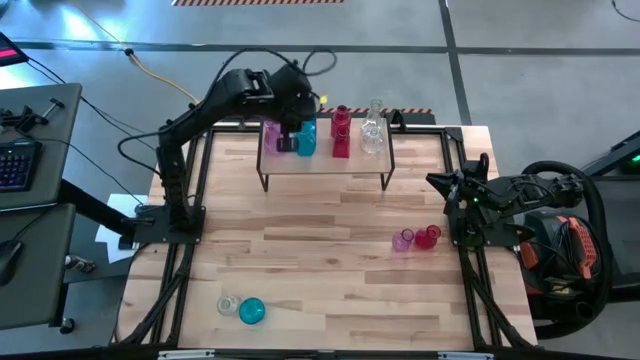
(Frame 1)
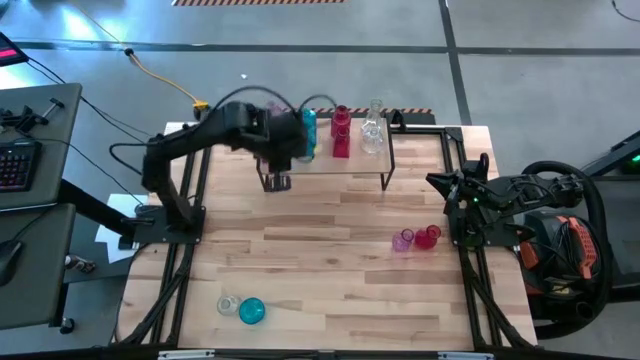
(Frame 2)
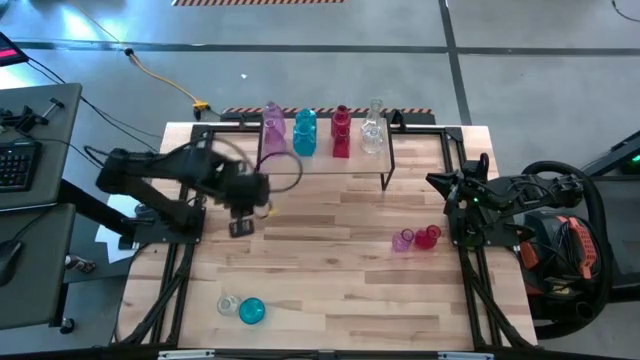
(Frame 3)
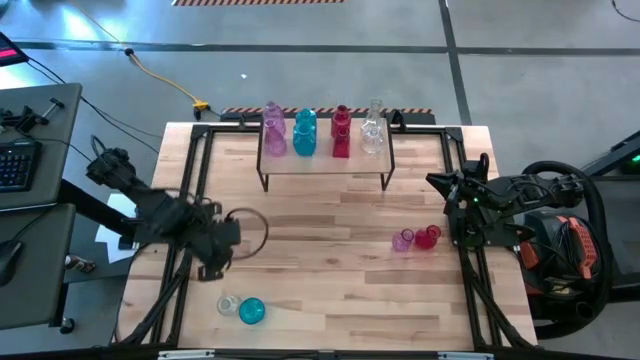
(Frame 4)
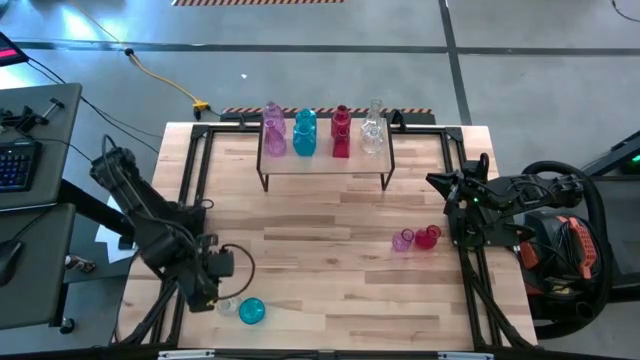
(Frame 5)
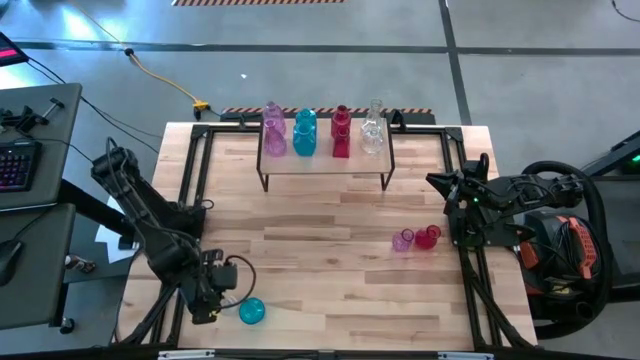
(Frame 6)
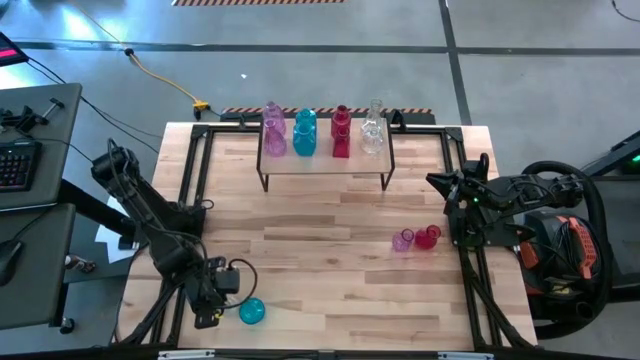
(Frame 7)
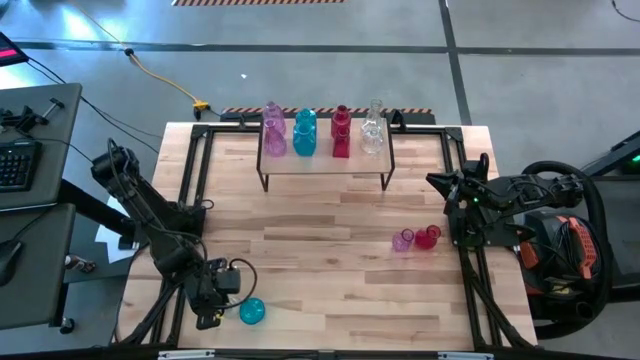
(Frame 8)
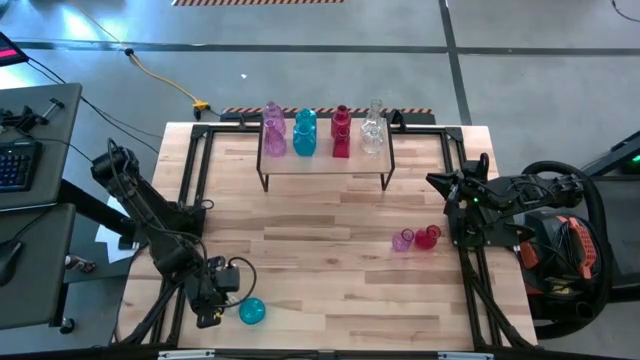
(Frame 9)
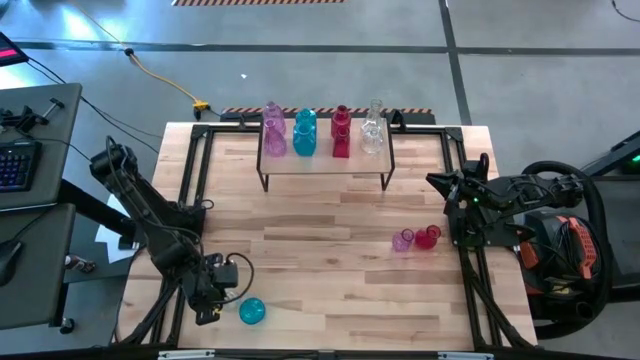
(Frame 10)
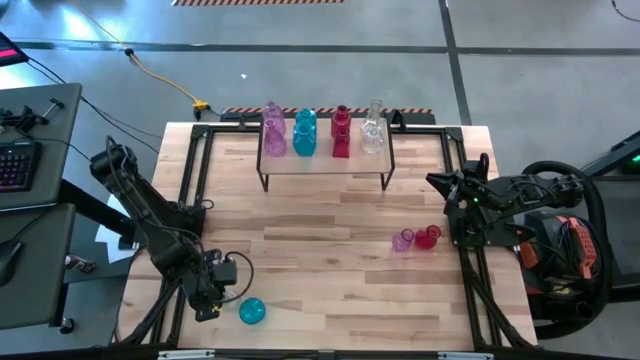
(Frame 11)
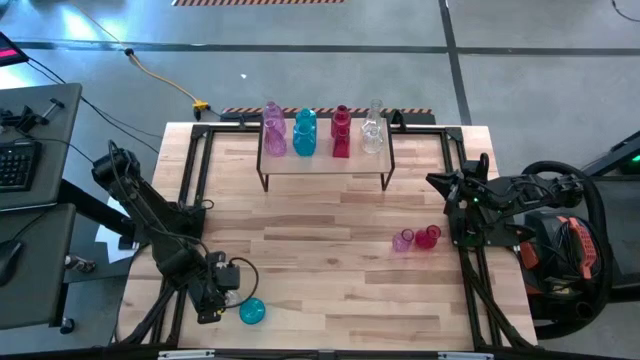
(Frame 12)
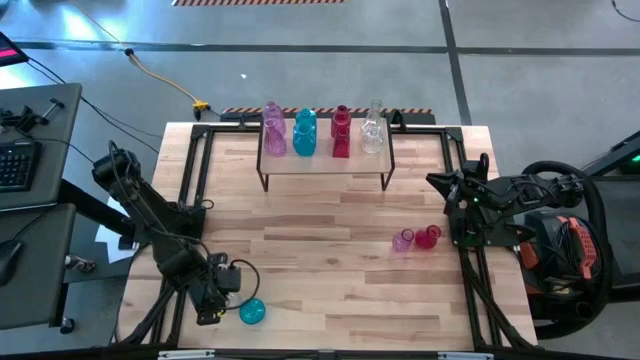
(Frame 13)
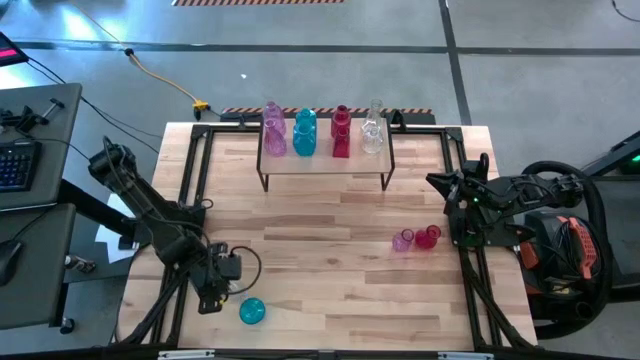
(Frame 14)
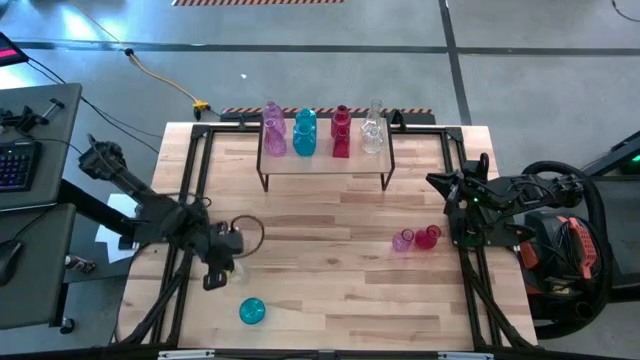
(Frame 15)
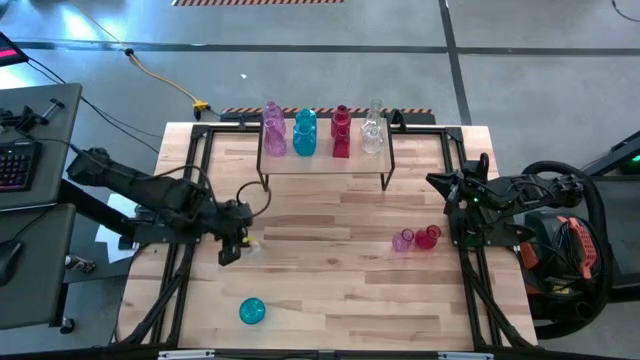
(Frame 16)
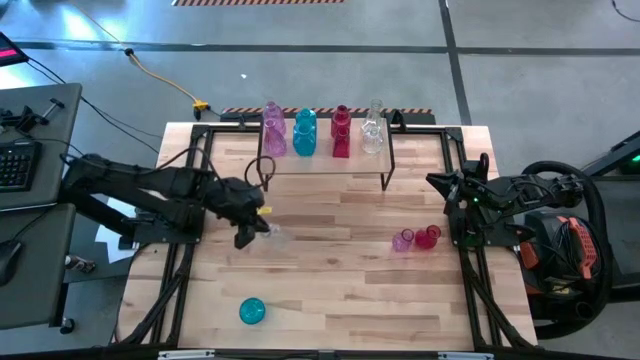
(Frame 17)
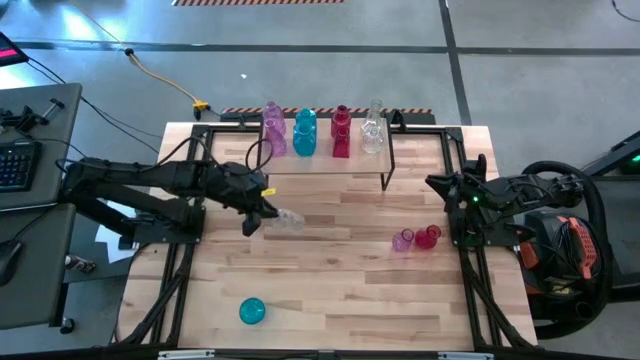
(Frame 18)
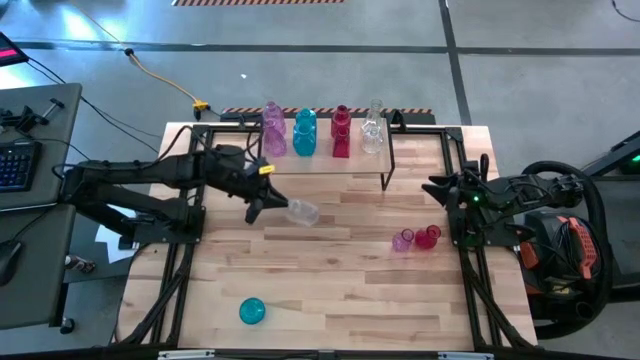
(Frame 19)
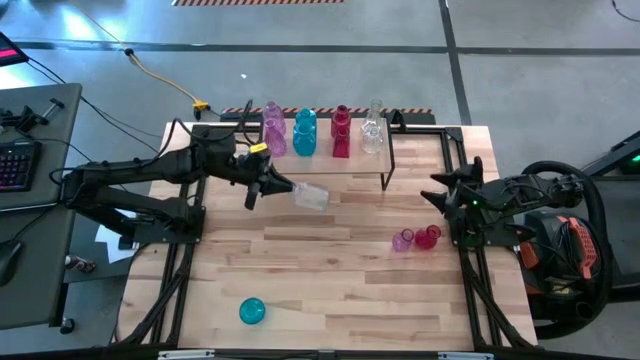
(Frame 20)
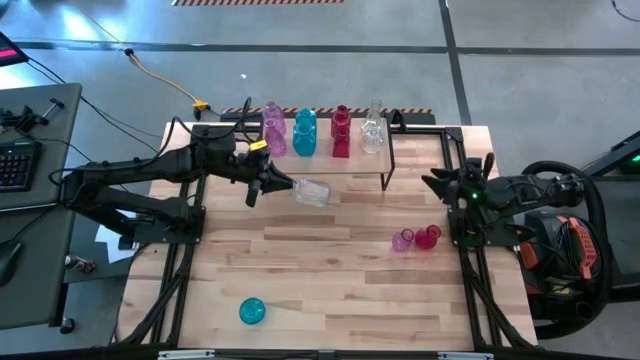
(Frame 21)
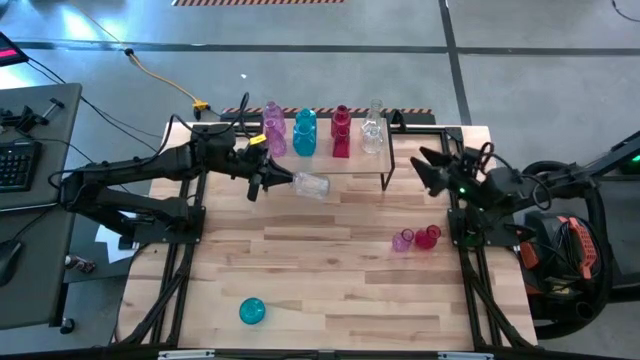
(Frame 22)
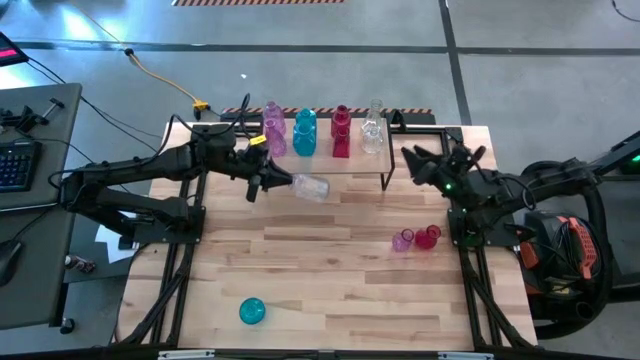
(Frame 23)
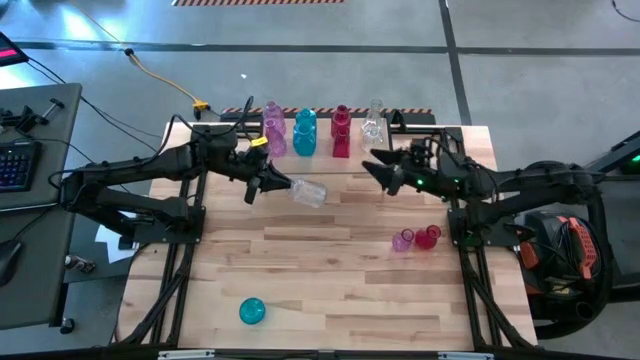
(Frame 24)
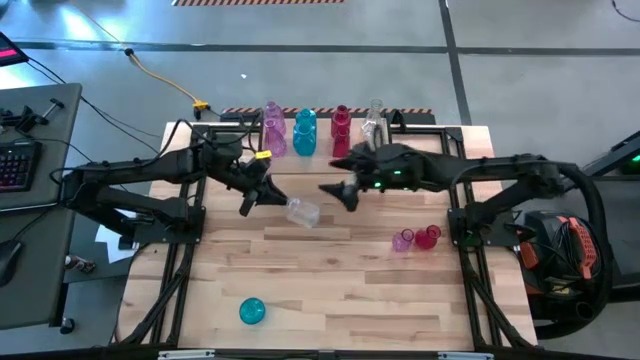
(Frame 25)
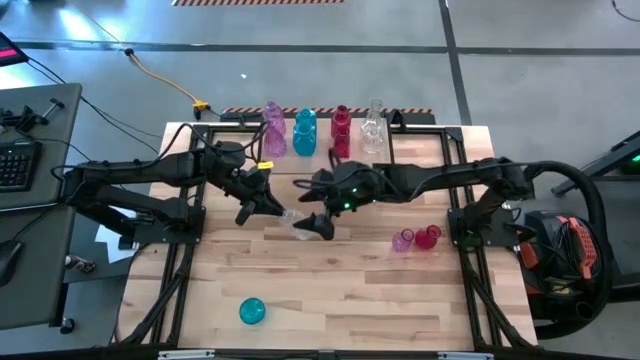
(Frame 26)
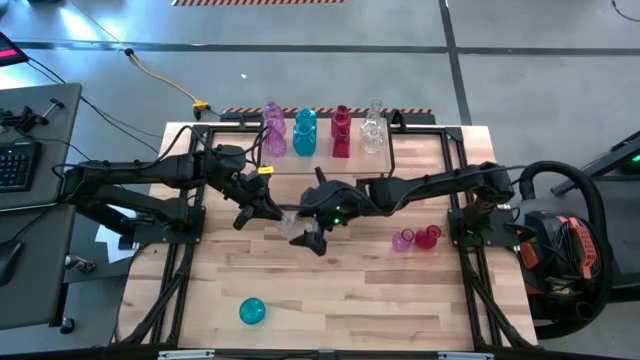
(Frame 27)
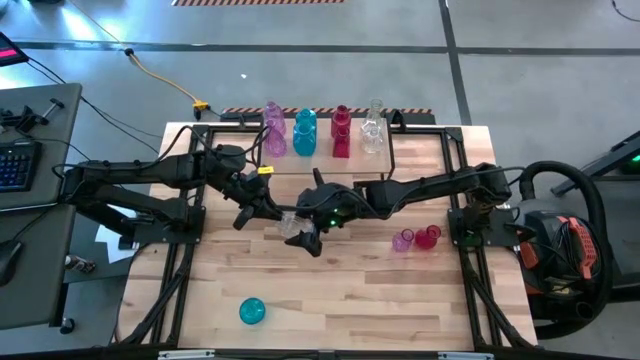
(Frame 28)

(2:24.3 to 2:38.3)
Task: sort vases onto shelf
Put the transparent vase on the shelf aligned with the other transparent vases

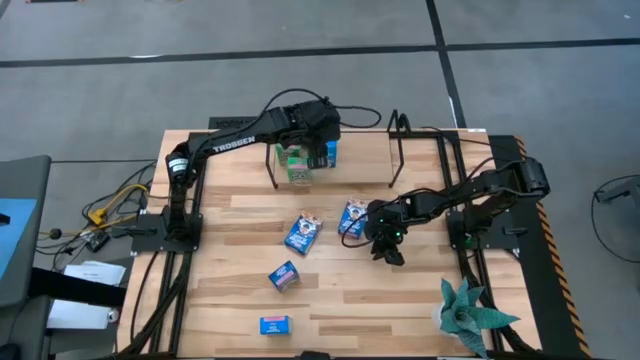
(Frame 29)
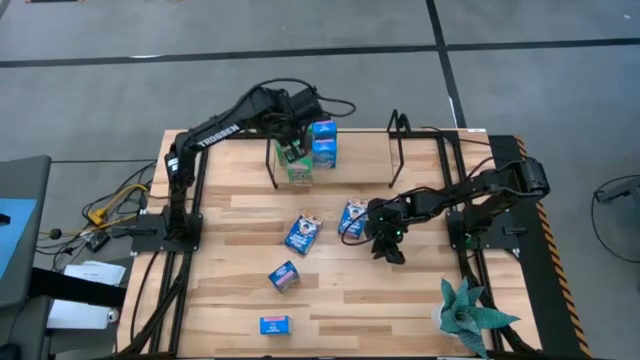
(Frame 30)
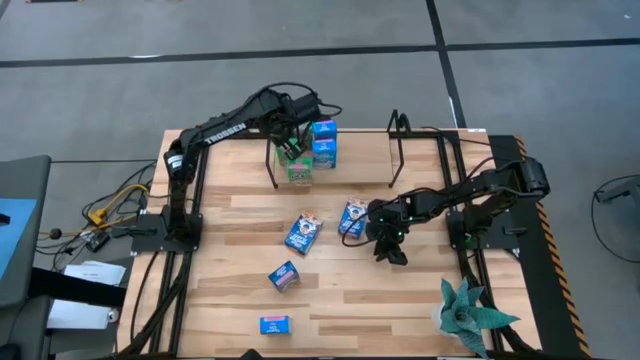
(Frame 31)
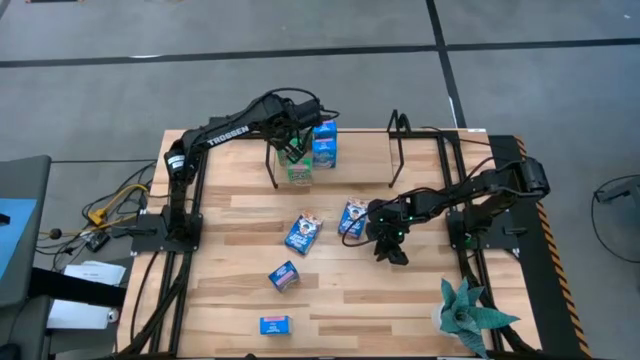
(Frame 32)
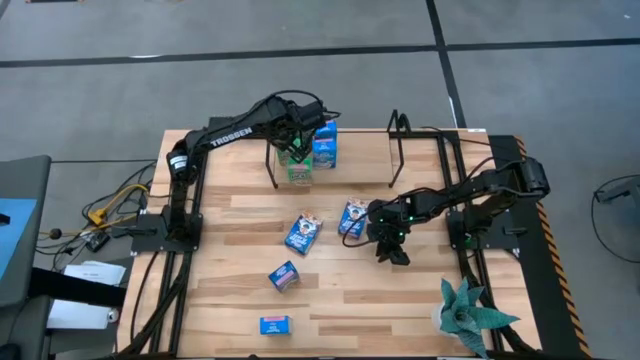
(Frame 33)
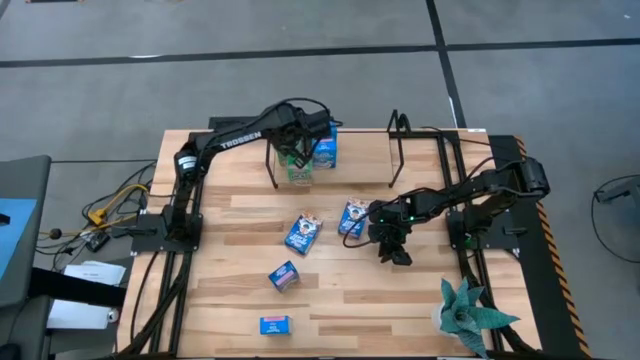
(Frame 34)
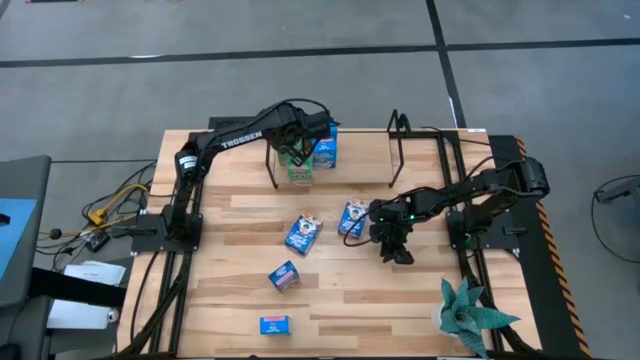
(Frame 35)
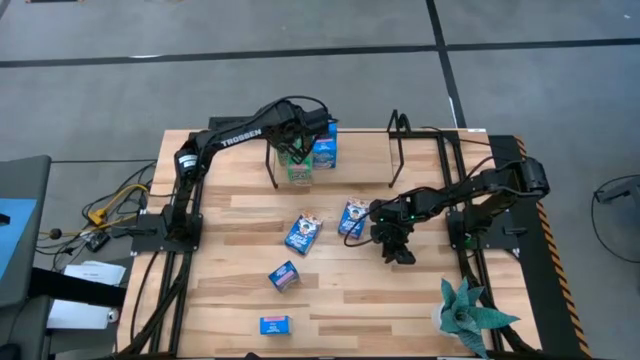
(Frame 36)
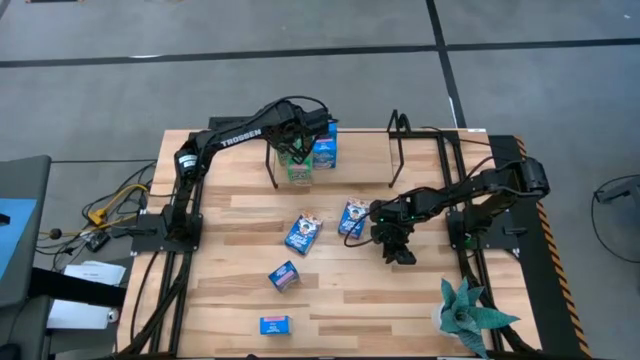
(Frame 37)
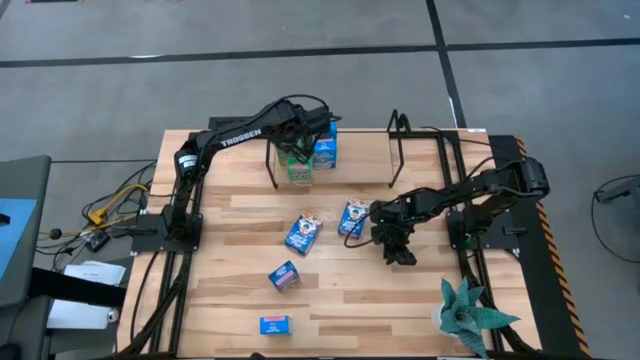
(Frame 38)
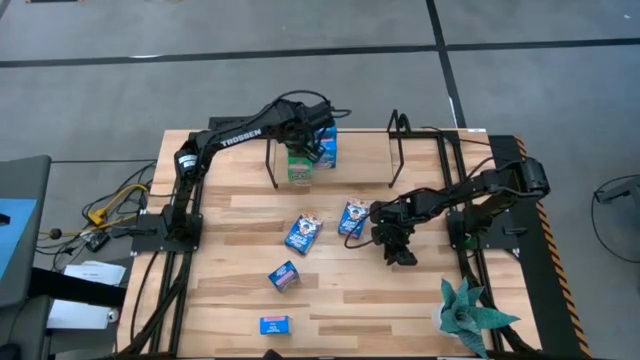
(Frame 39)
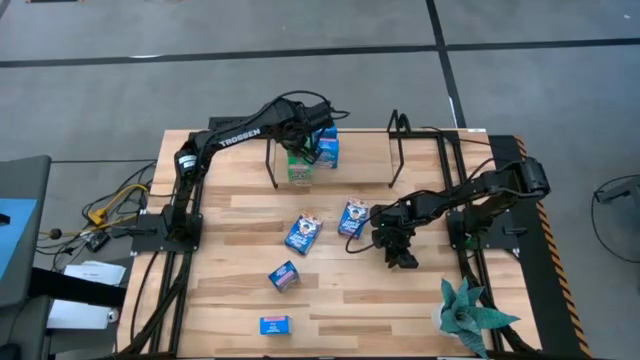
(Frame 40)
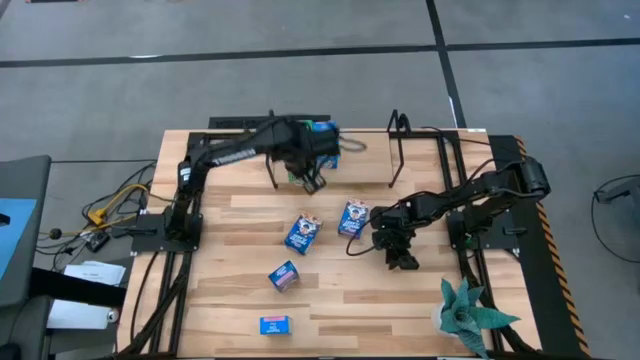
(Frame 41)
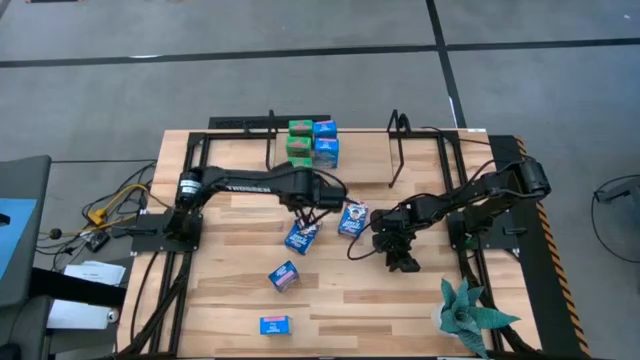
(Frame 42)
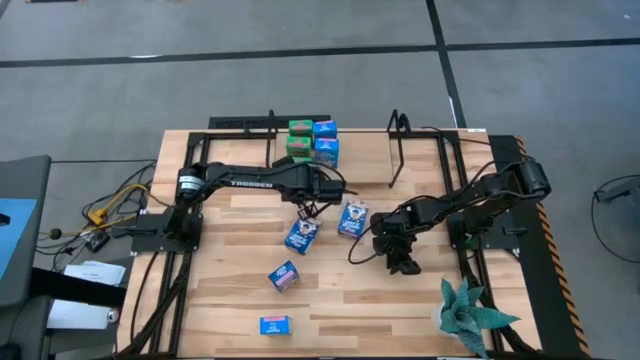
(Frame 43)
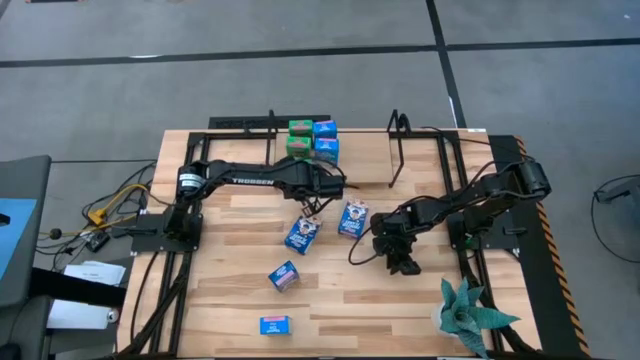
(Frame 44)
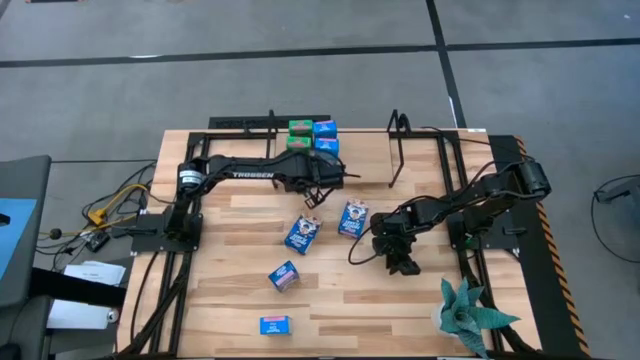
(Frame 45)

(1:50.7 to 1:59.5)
Task: Stack cereal on shelf
Adjust the green cereal boxes on the shelf
